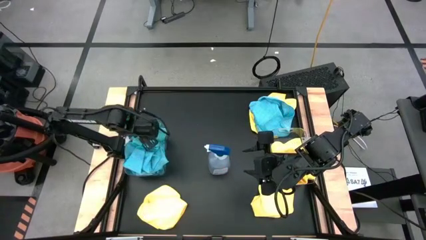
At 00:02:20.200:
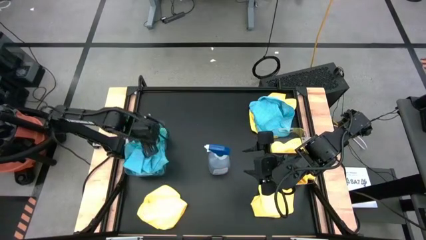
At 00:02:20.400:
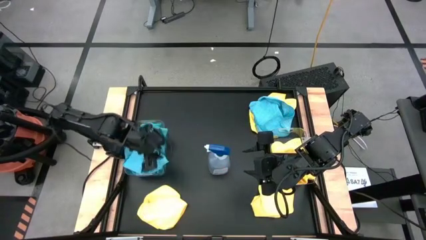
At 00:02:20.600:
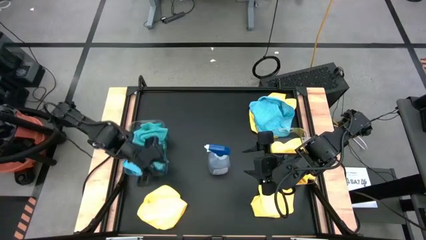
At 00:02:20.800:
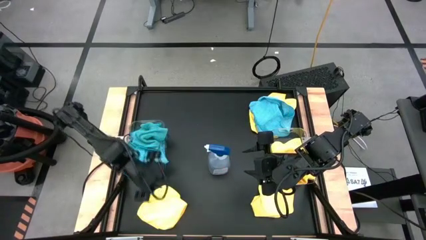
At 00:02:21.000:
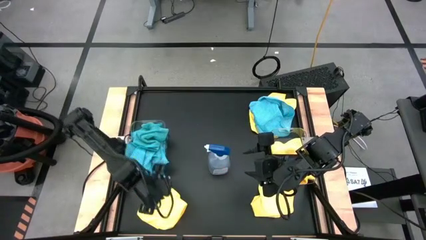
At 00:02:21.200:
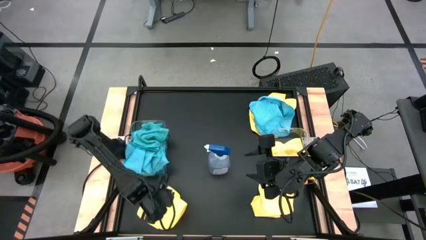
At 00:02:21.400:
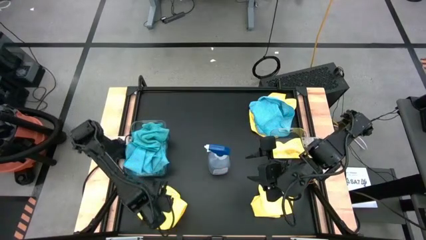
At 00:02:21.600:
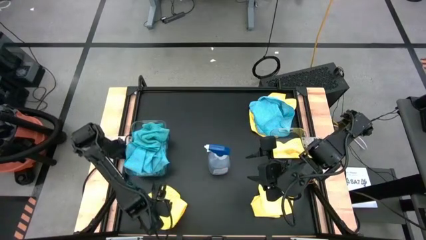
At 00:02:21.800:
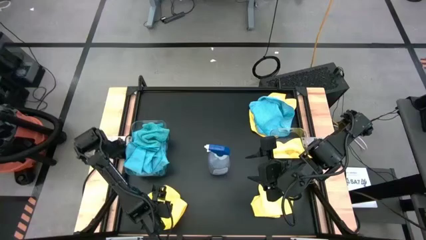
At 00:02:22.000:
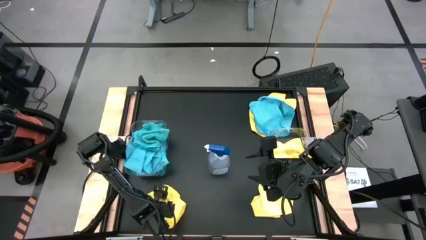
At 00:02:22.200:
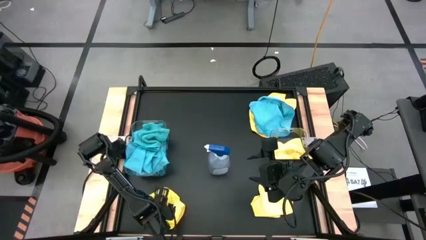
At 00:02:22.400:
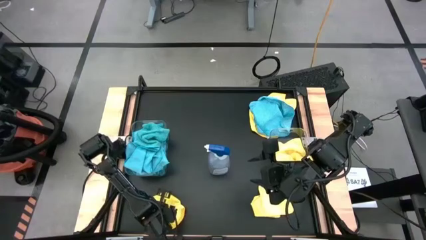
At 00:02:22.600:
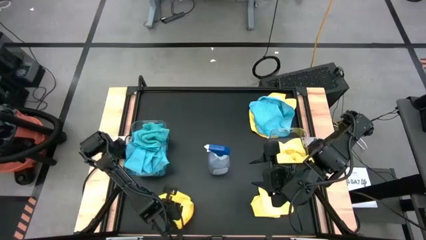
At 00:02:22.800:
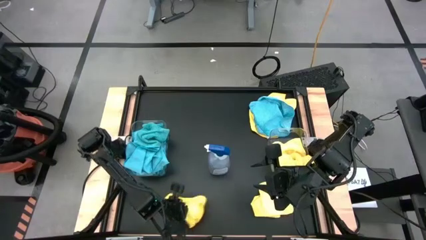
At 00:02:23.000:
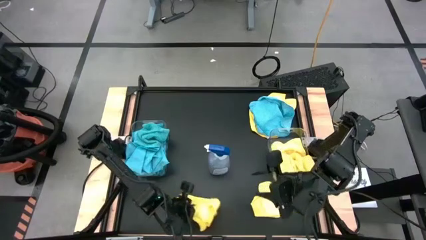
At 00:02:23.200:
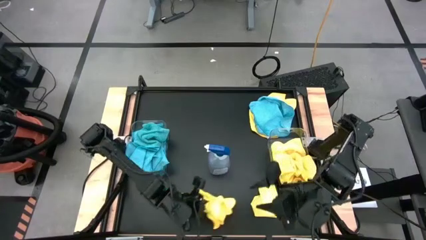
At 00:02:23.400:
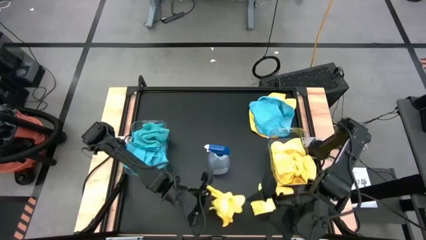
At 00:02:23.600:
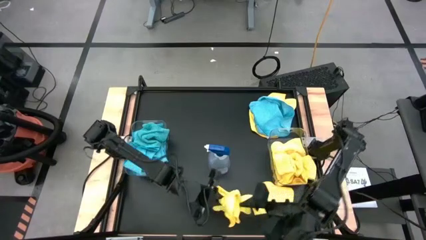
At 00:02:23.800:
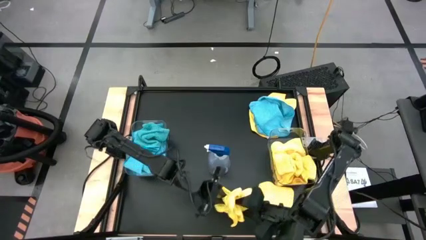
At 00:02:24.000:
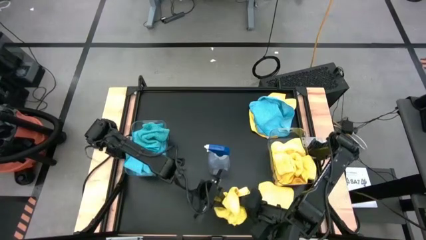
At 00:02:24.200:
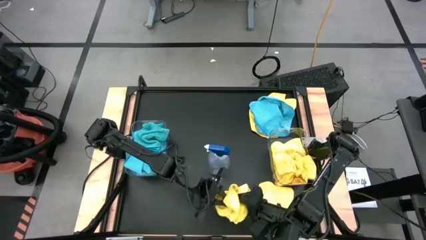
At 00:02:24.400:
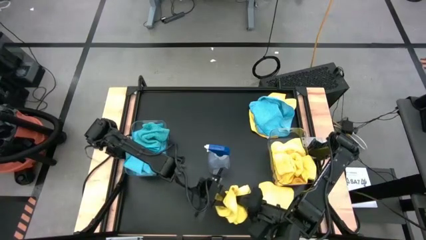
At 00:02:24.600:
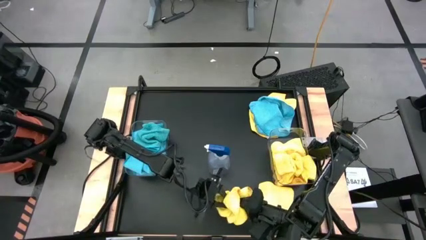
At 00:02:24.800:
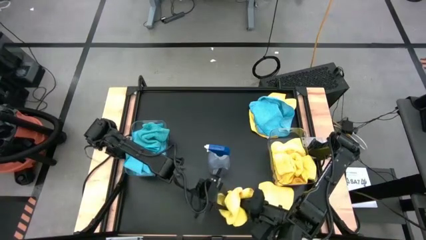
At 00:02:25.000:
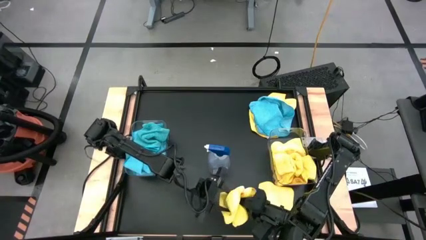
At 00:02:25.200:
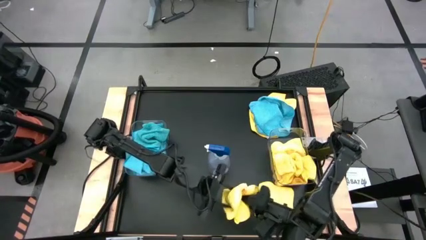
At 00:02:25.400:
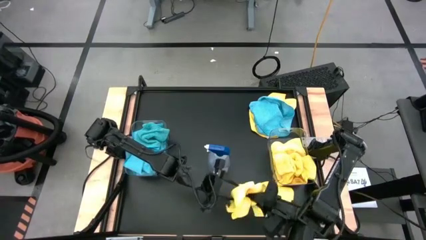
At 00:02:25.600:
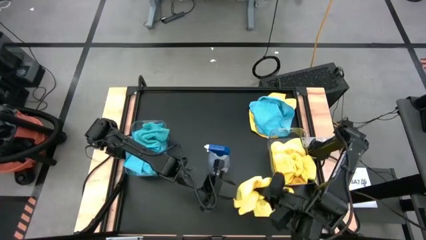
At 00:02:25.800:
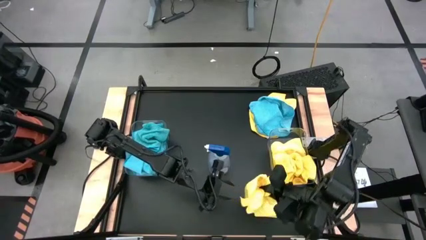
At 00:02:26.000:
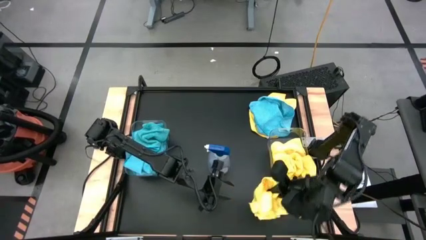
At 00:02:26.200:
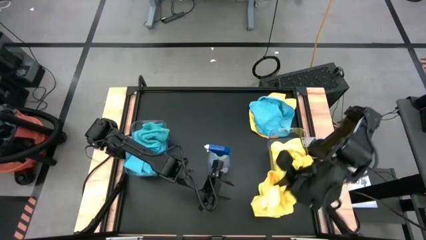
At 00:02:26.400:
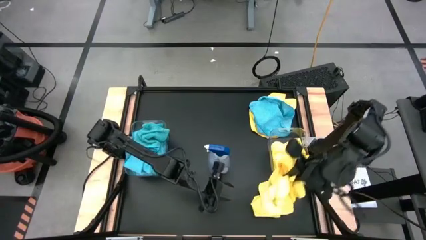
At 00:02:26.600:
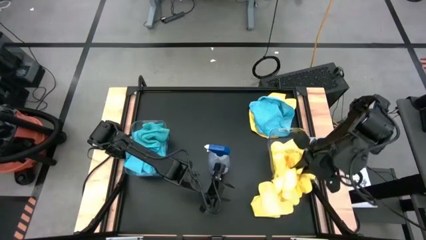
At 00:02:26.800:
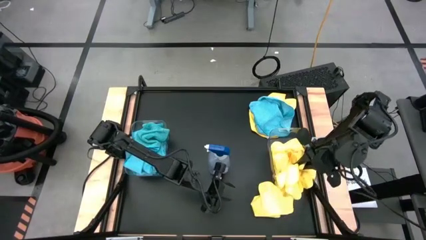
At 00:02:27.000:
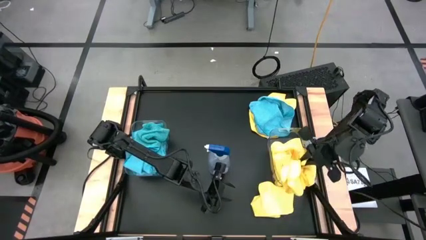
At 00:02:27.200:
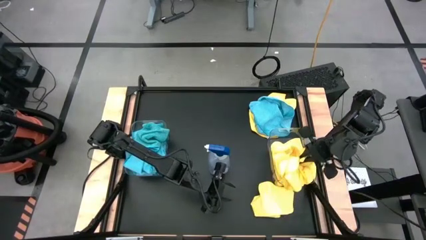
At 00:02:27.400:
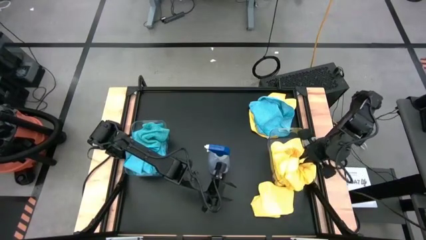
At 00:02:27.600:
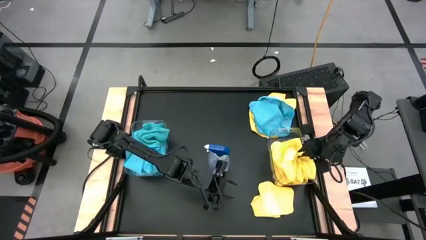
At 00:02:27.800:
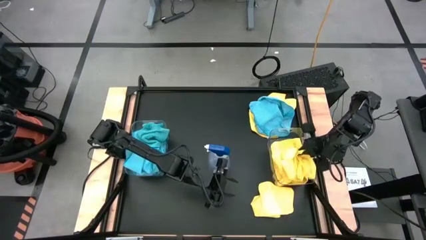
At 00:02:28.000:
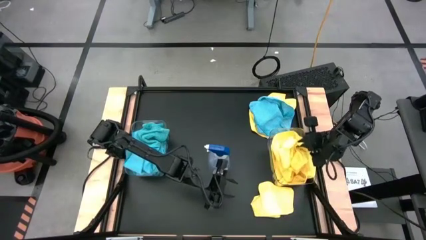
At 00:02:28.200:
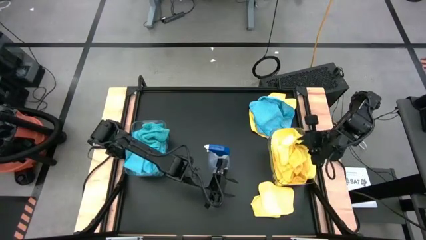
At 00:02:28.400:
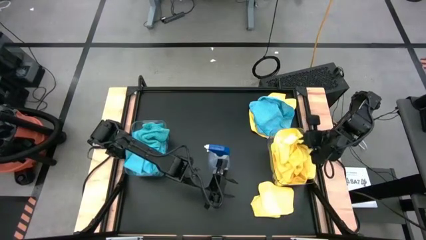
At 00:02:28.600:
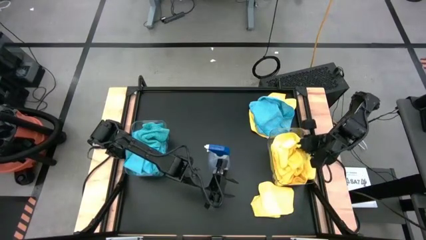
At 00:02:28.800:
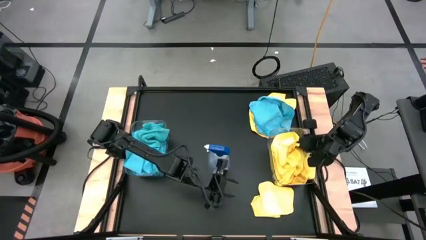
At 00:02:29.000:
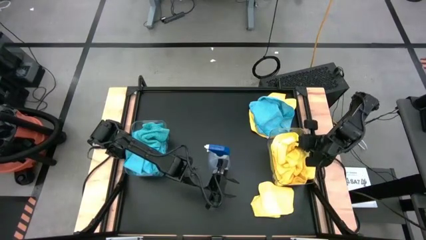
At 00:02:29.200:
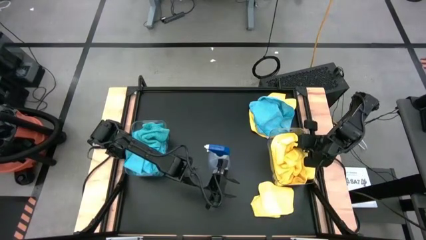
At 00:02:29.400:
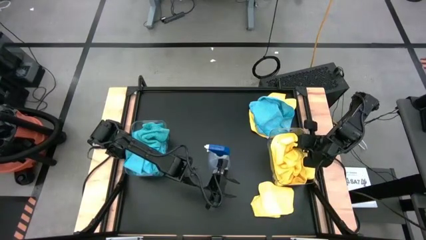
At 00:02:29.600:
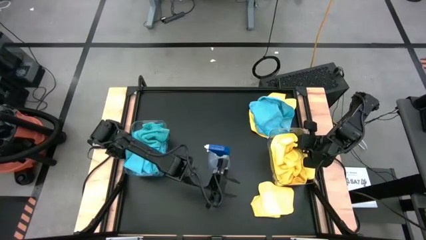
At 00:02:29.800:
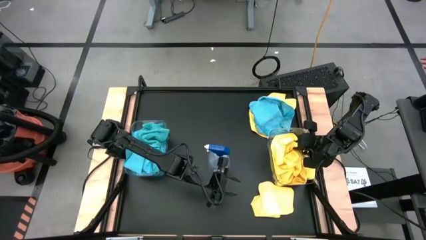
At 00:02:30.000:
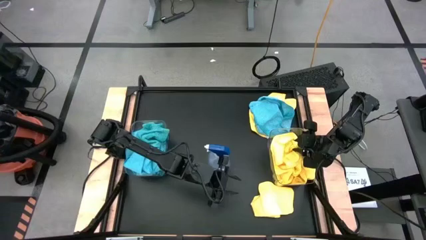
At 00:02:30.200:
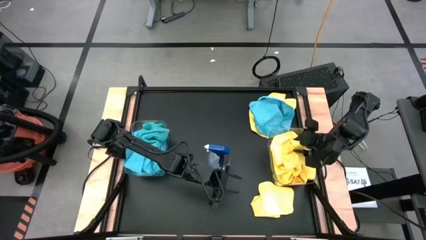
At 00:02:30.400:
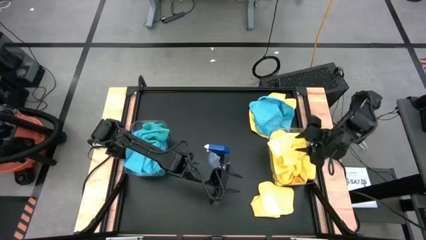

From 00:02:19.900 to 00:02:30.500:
Task: Sort microfiber towel by color & place in baskets
Put the yellow microfiber cloth into the right transparent bin

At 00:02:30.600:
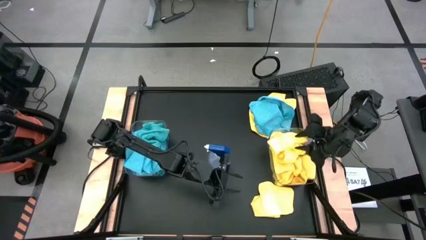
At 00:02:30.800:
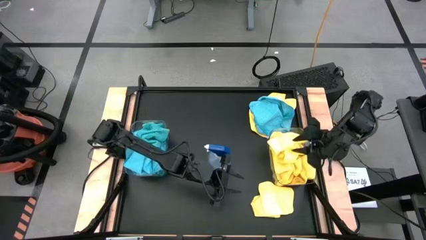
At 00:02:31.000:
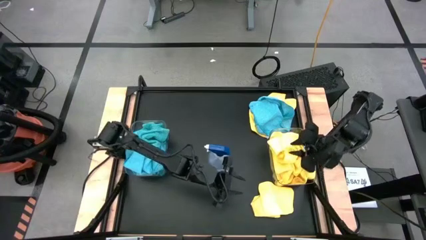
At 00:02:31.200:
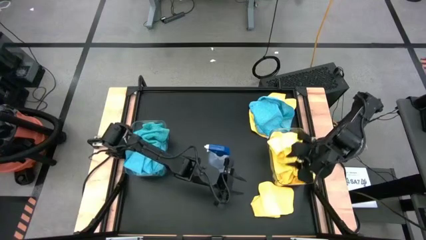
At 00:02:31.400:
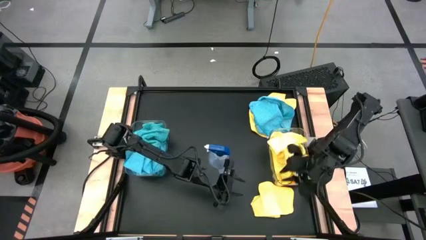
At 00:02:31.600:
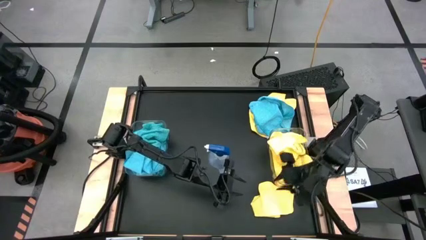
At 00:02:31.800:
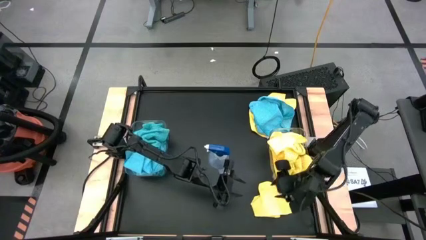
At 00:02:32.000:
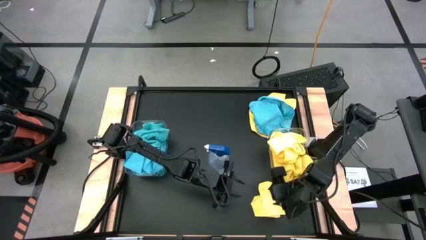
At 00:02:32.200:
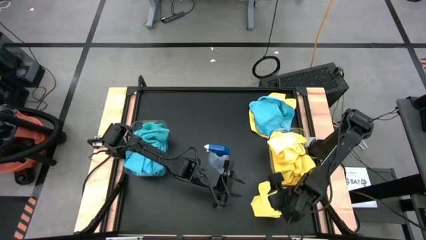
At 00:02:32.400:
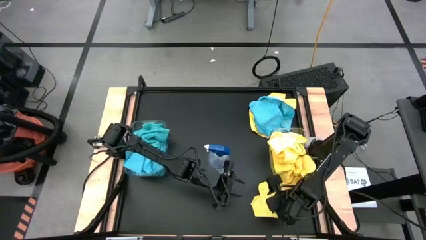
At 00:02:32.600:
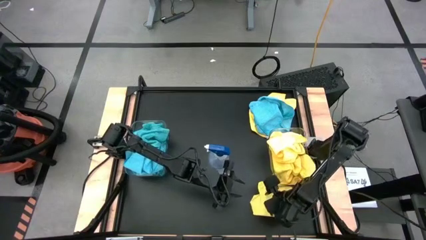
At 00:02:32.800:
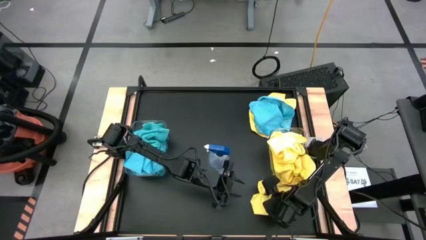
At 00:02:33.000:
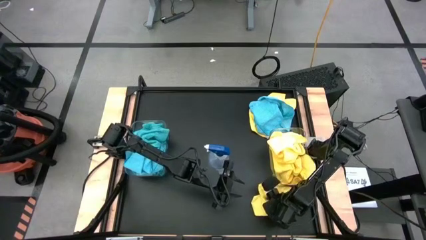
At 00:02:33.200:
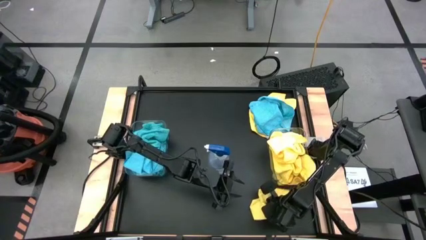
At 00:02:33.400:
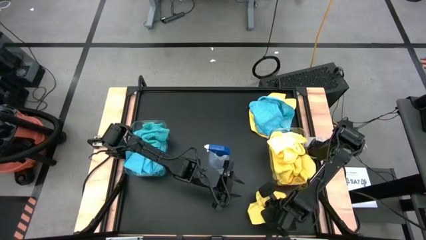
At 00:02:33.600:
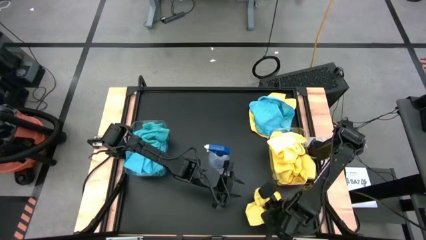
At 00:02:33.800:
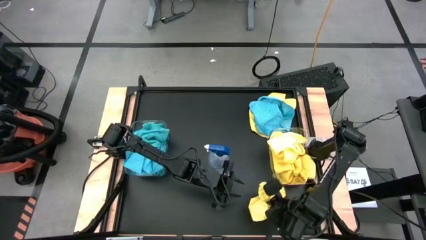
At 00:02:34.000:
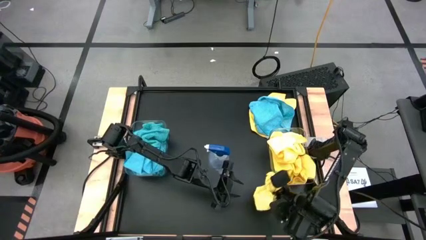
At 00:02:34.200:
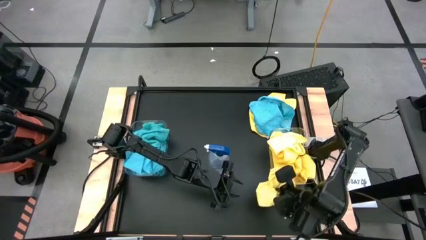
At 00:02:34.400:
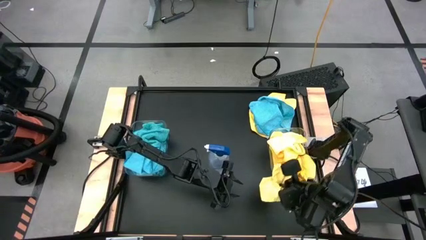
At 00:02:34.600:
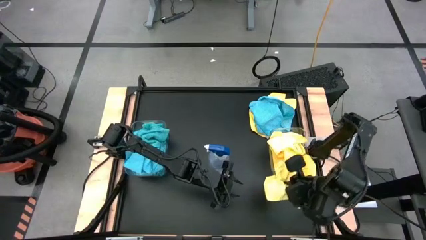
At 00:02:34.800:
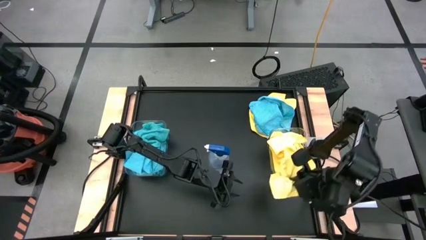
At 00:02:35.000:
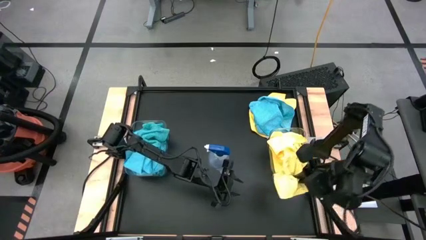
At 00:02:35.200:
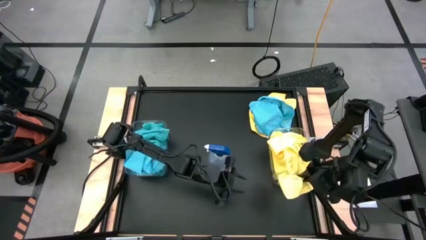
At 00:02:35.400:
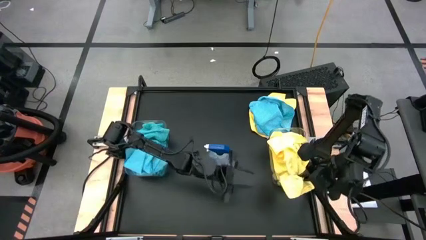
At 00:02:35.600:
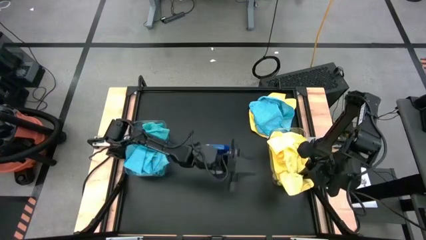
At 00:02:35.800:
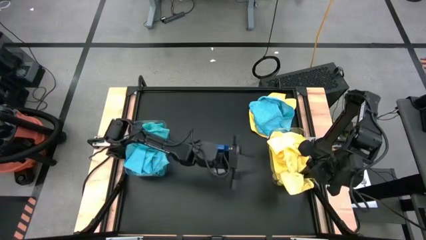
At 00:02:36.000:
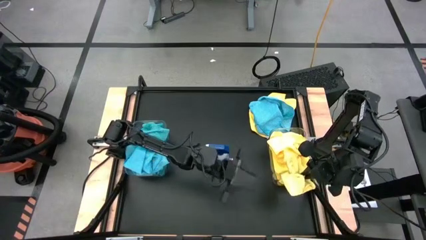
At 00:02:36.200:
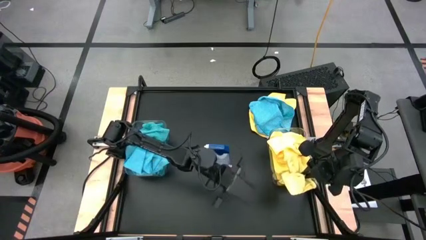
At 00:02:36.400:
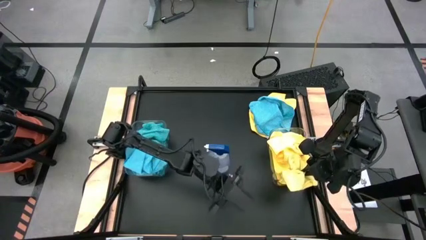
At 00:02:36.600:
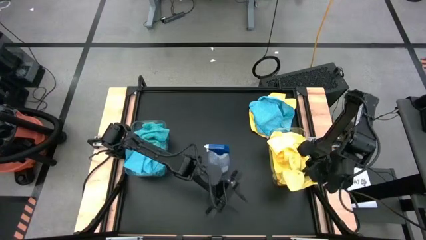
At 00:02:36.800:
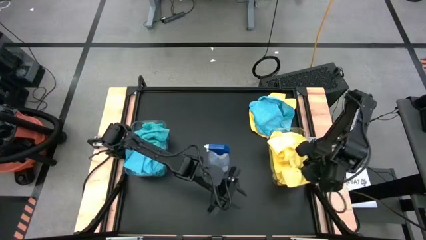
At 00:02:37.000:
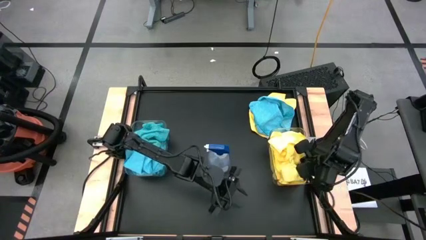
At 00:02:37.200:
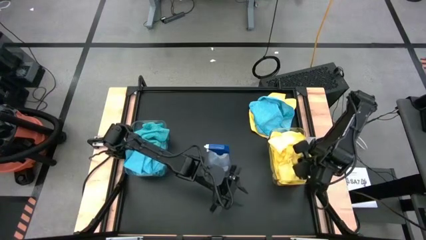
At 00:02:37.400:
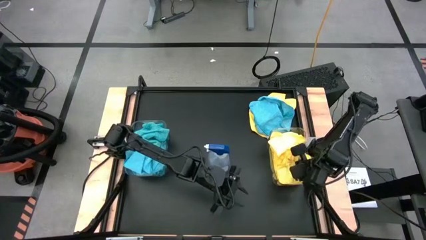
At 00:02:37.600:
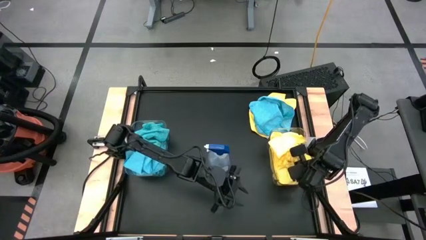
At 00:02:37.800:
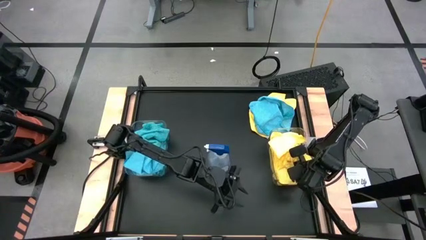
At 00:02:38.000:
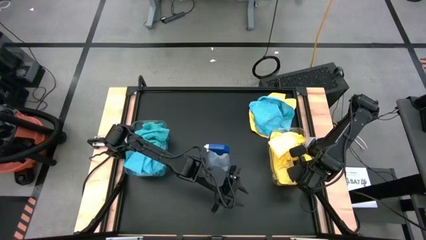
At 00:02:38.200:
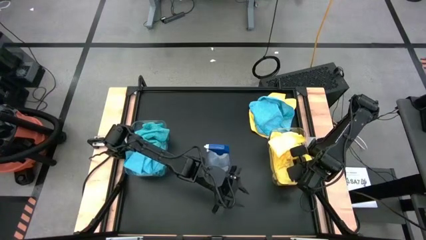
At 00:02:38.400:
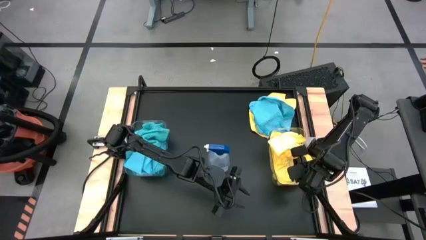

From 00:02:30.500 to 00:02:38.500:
Put the yellow microfiber cloth into the right transparent bin
